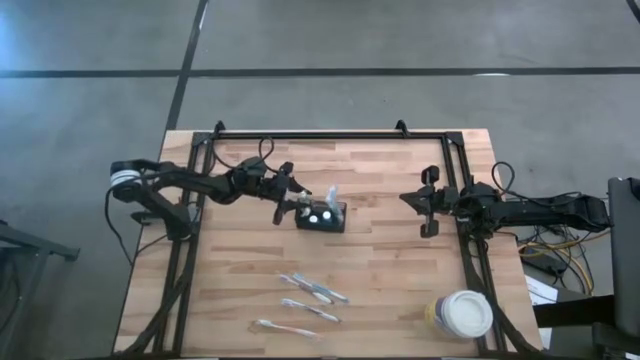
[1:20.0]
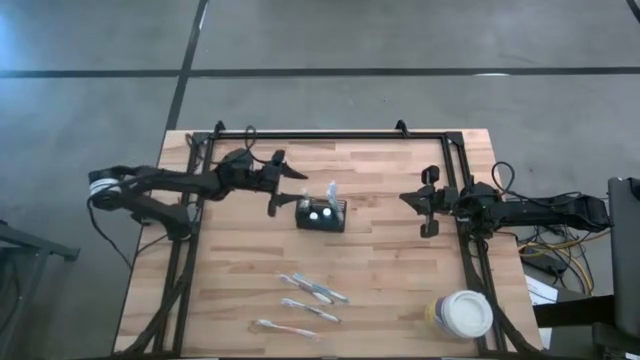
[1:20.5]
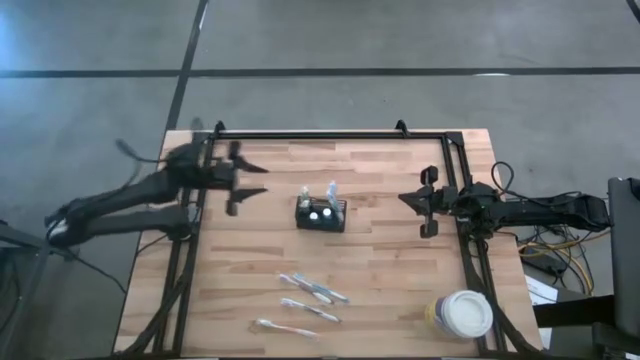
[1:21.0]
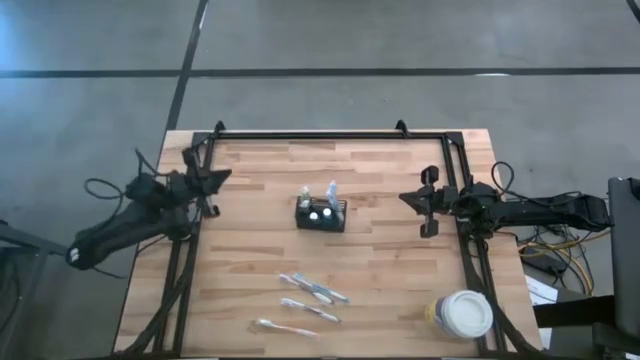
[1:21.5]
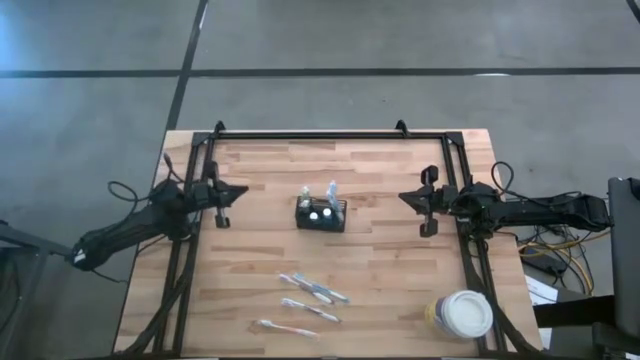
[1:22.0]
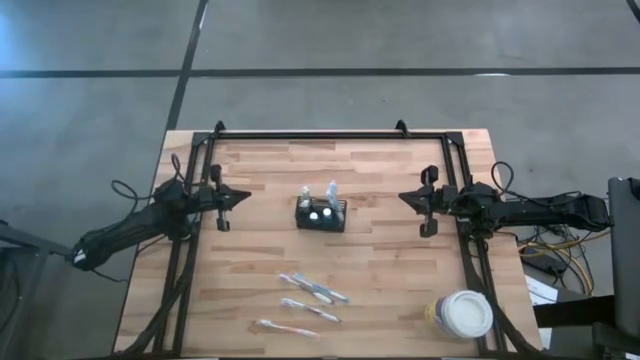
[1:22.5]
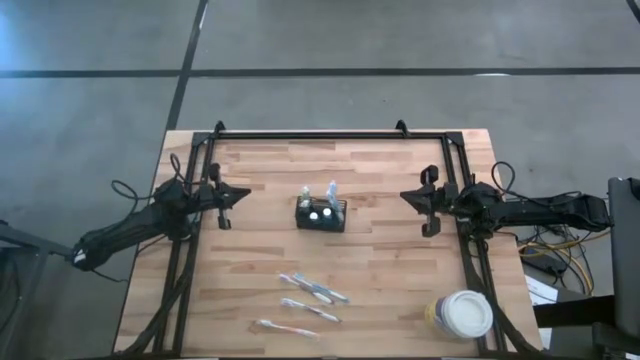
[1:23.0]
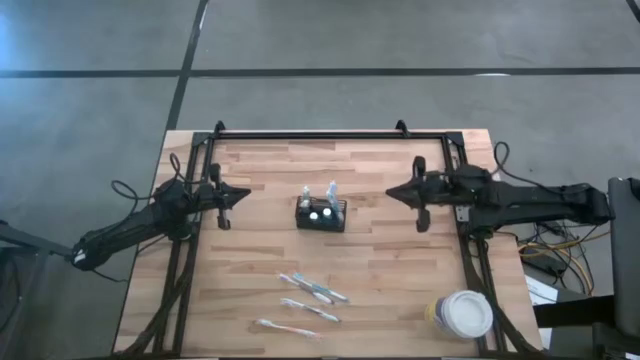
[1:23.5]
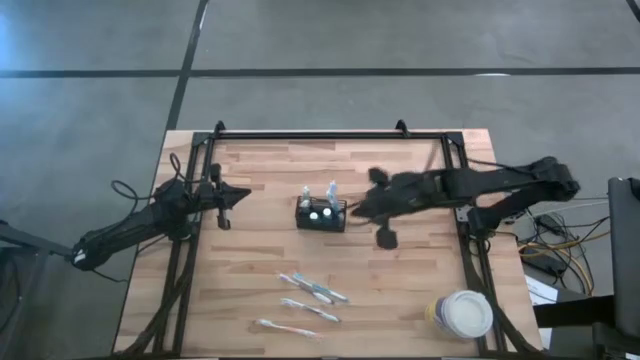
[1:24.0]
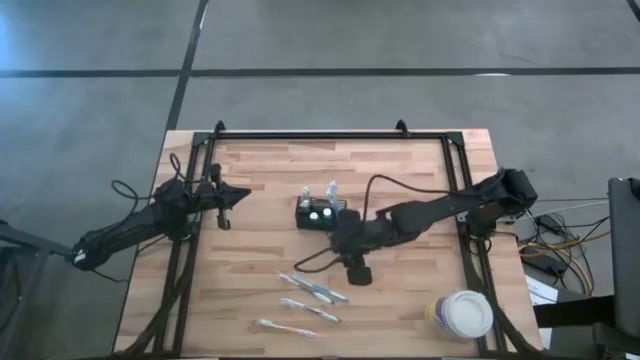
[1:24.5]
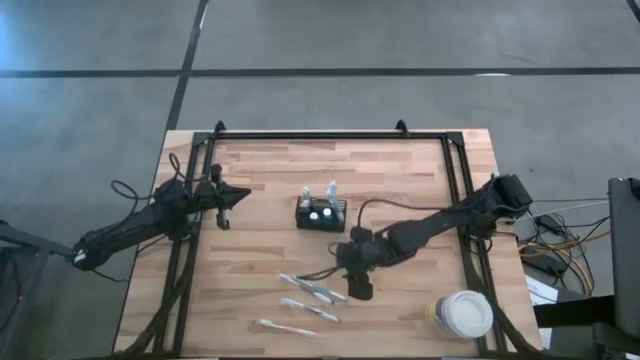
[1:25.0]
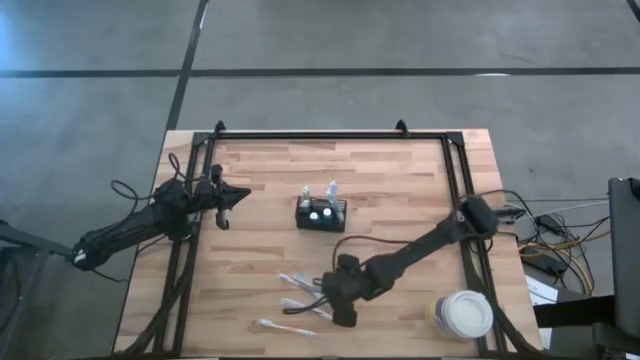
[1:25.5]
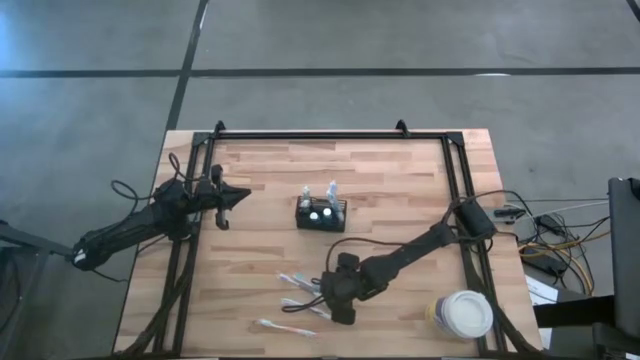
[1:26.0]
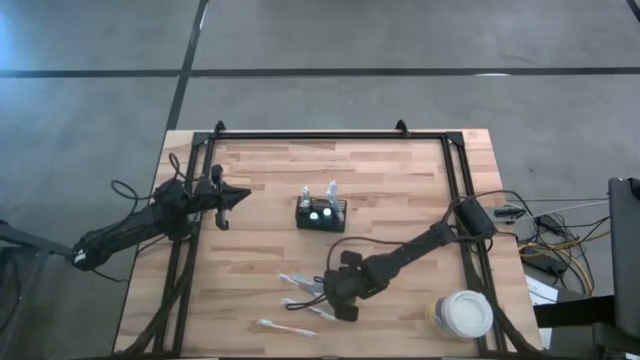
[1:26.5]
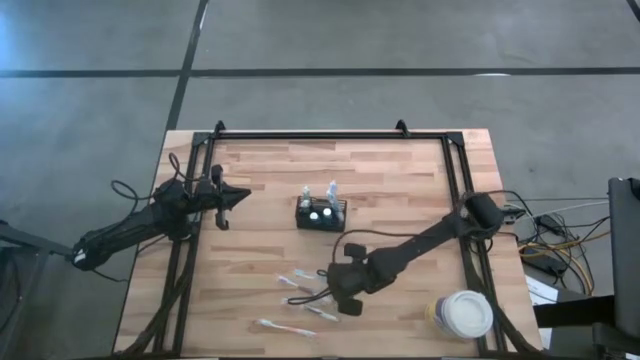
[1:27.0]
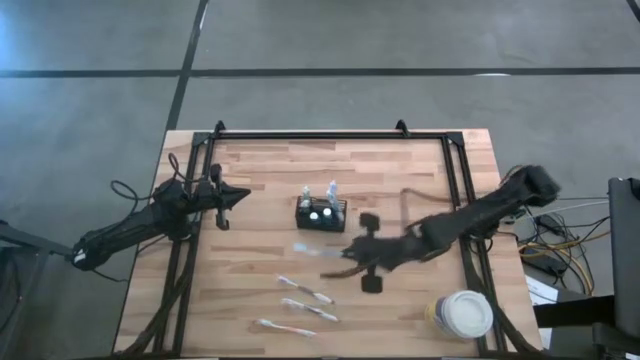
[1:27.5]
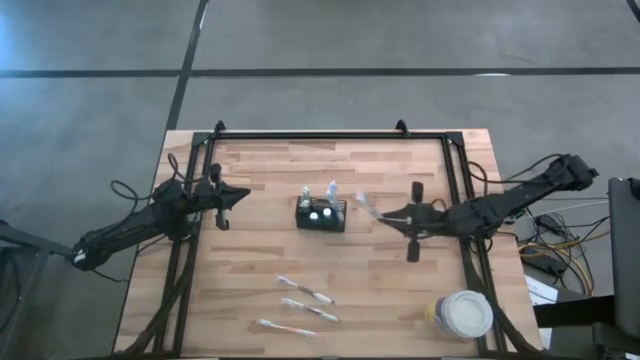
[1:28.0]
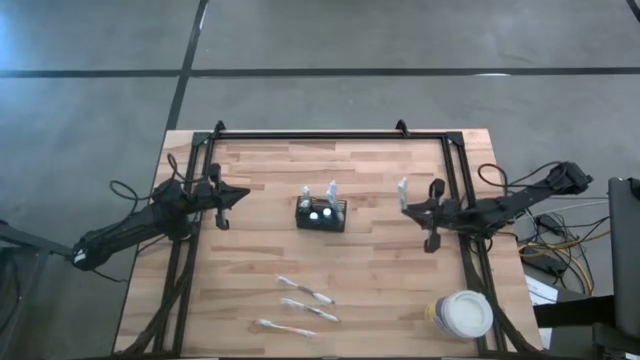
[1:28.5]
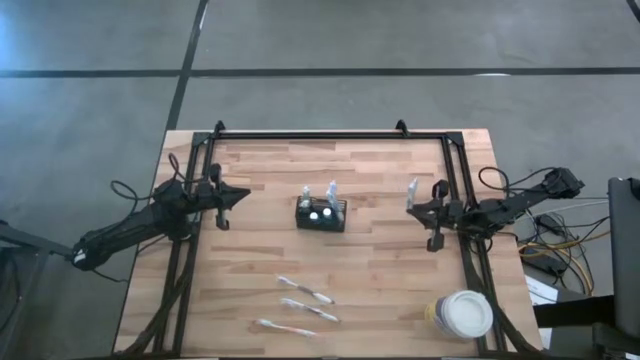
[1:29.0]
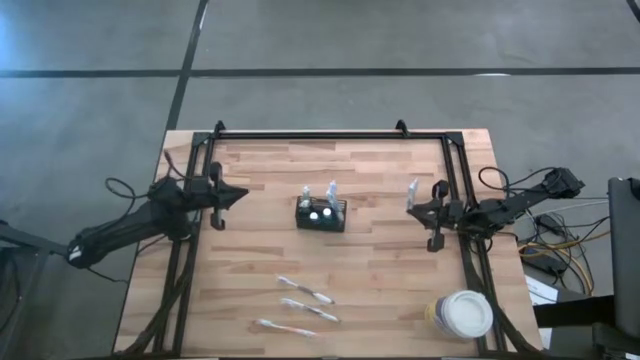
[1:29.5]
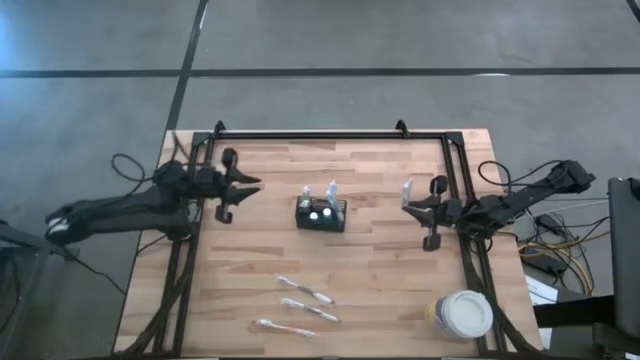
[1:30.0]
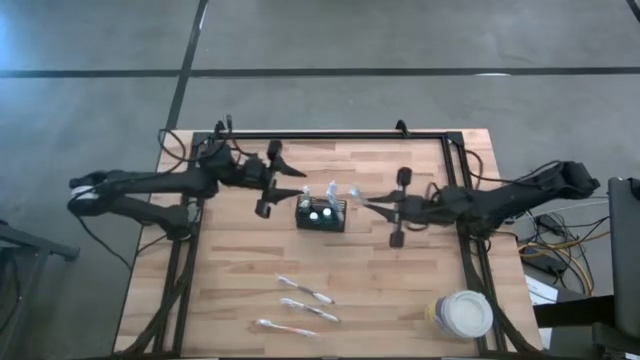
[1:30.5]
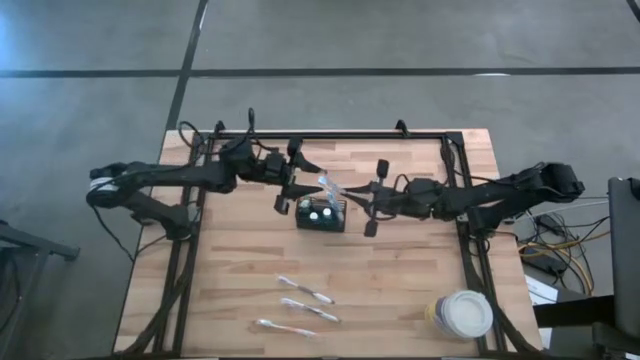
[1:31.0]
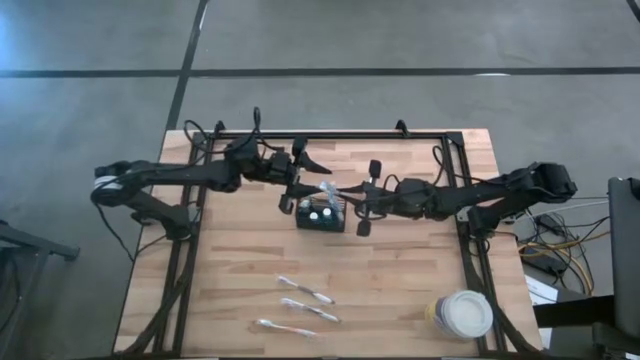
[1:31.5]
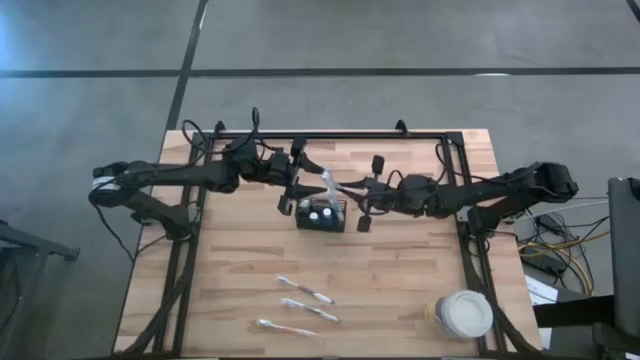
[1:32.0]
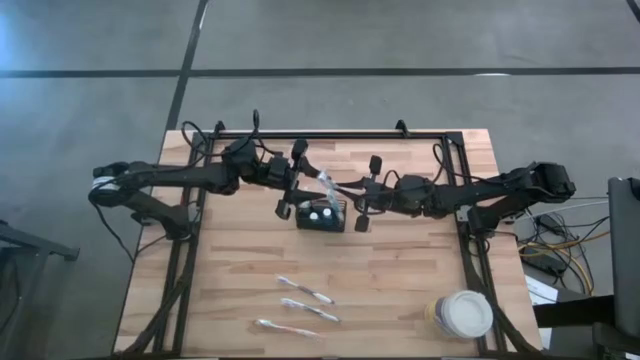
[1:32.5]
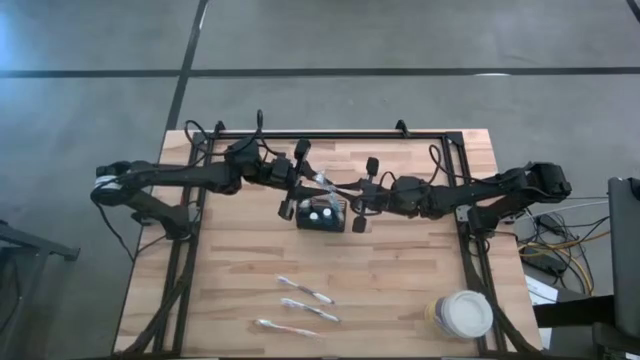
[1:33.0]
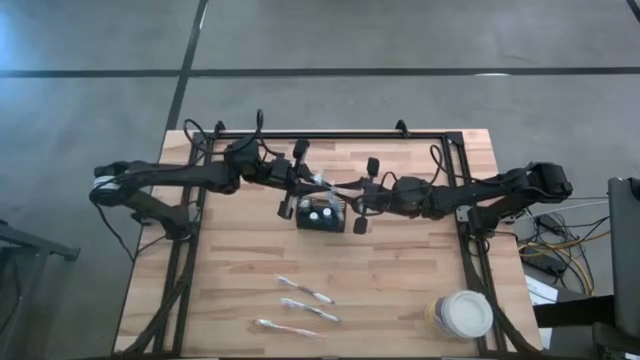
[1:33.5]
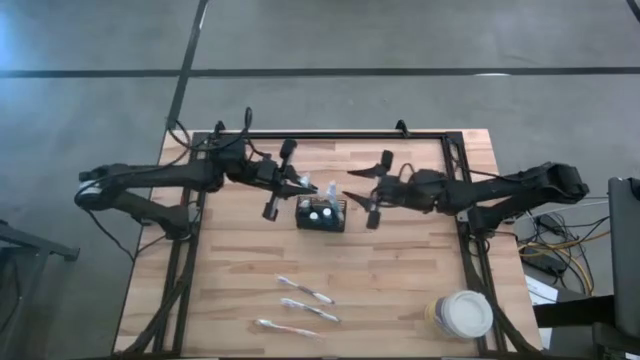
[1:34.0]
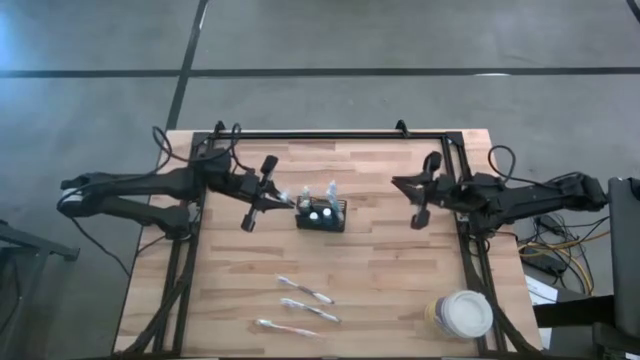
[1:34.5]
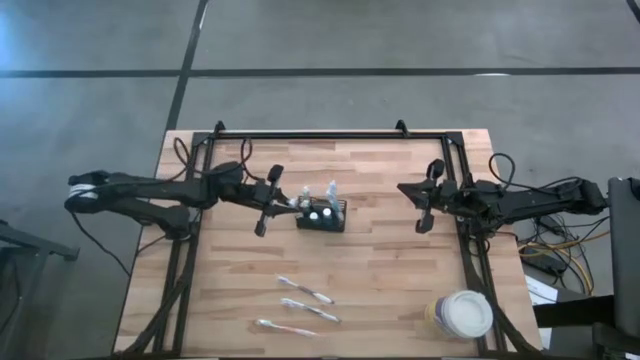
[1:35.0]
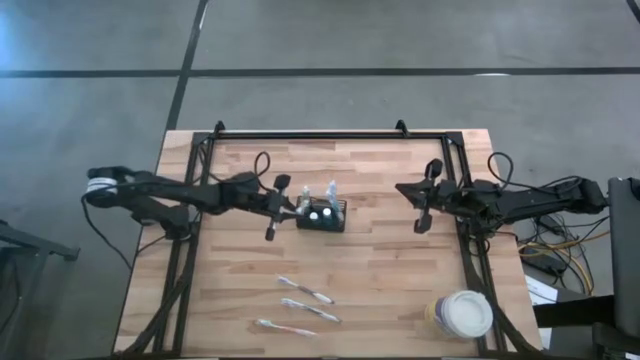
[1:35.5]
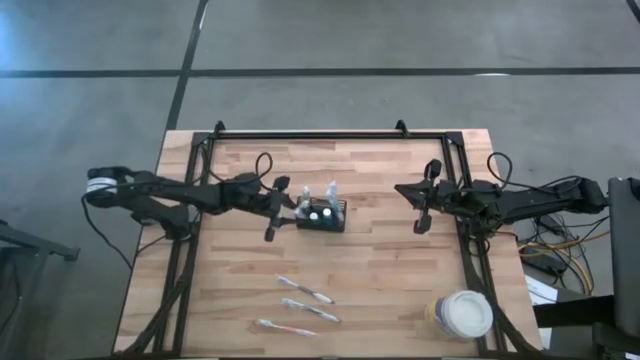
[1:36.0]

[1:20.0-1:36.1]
Task: Pick & Place toothbrushing station
Put the blue toothbrush into the wire organizer

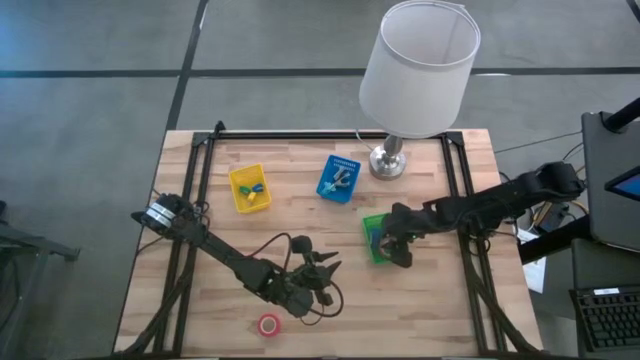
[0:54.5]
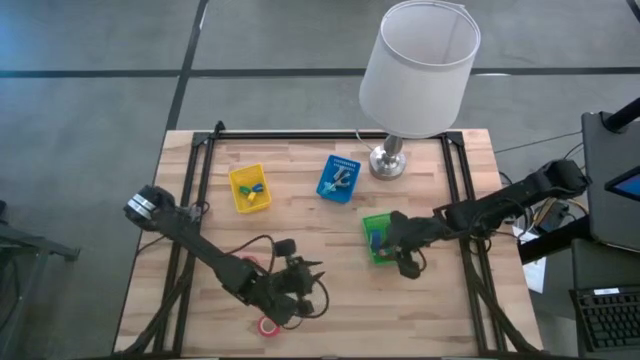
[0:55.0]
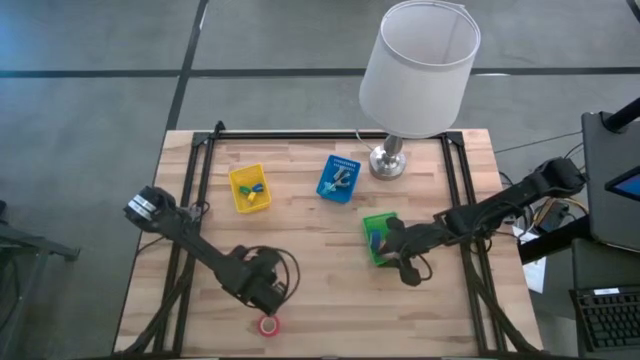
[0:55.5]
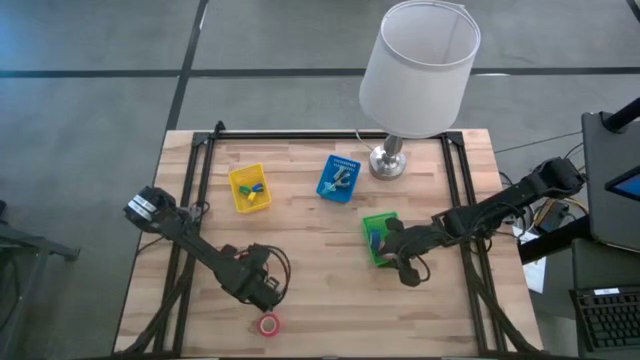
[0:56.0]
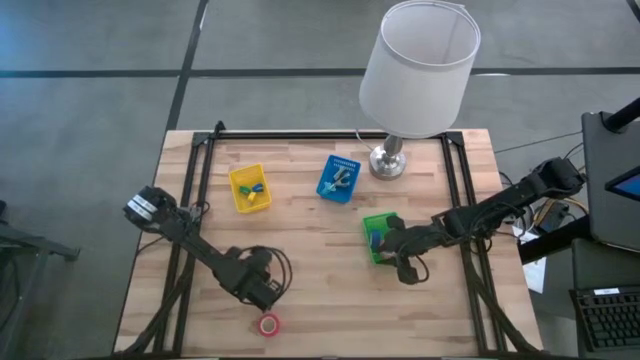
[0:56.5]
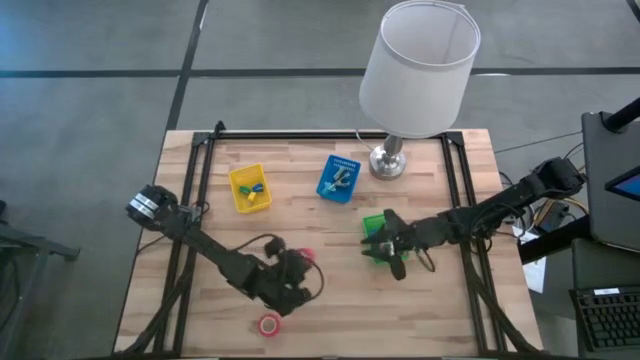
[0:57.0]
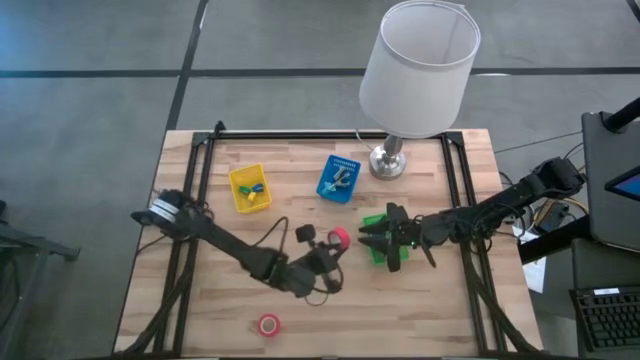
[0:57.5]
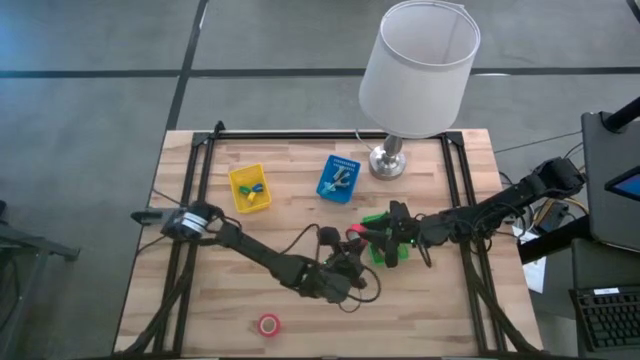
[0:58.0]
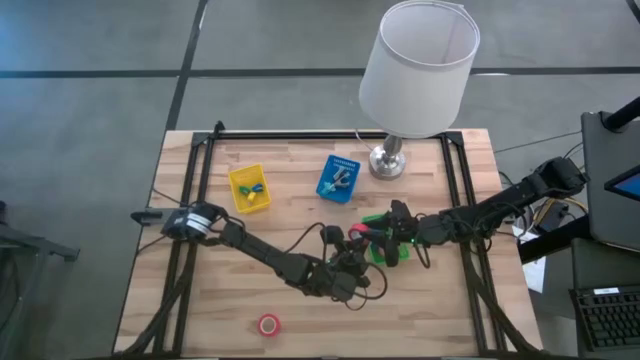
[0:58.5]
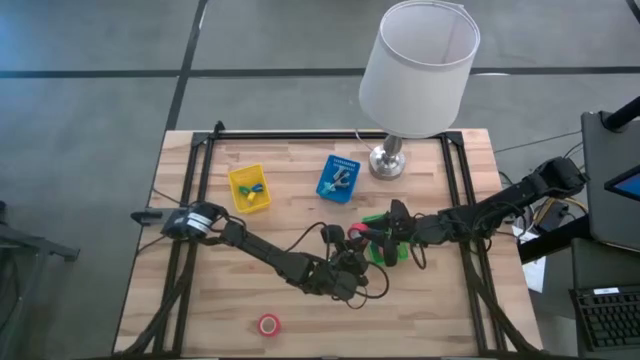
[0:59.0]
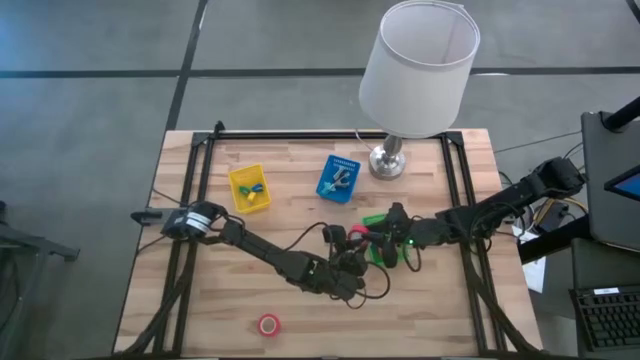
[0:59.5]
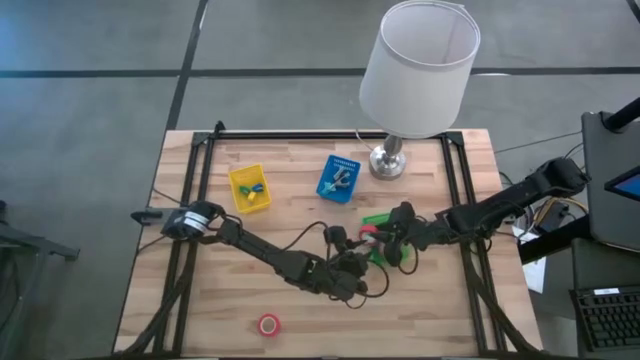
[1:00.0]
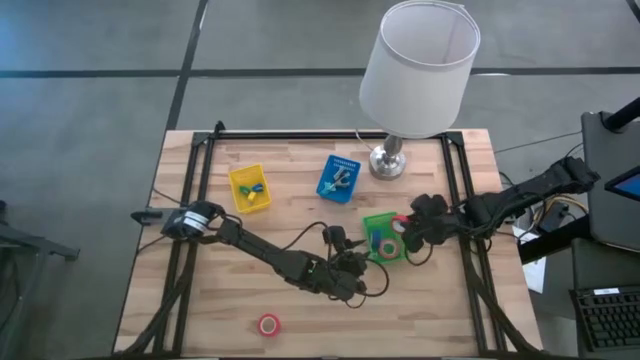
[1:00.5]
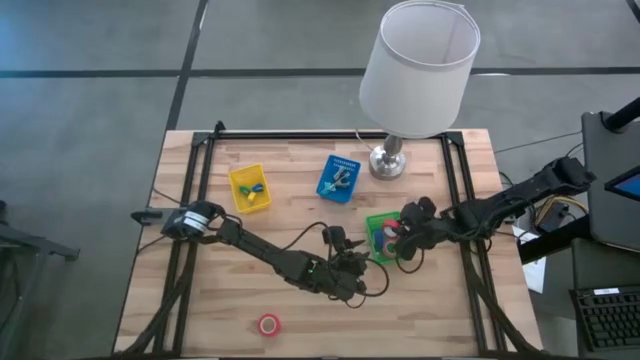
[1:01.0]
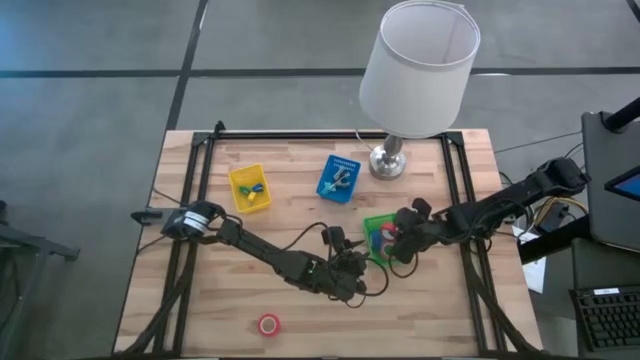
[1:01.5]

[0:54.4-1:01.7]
Task: Pick and place Stapler, Stapler remover, tape
Put the top red tape into the green basket
